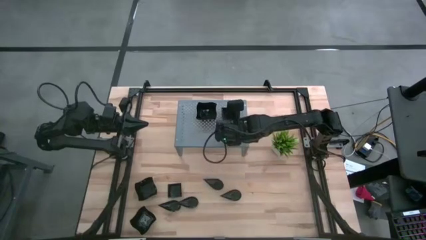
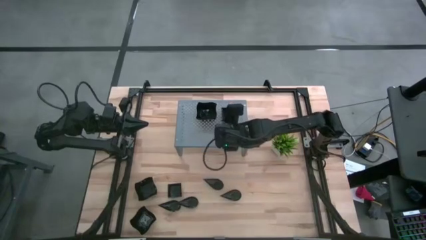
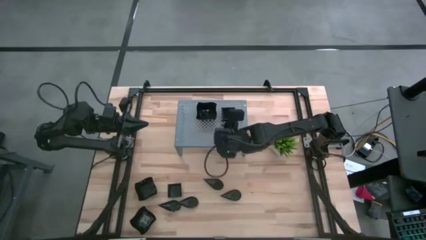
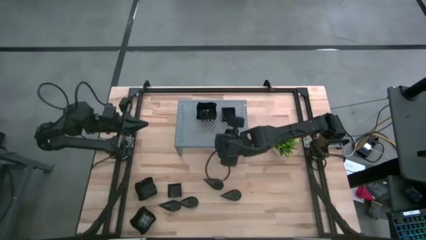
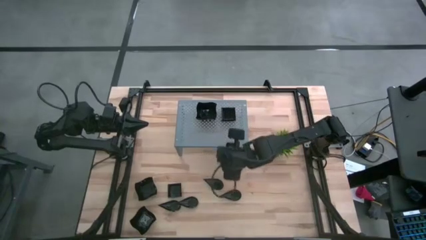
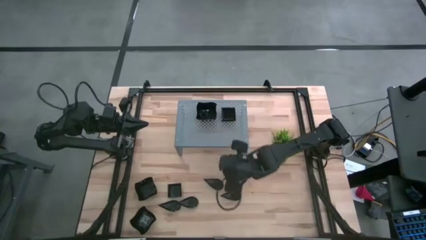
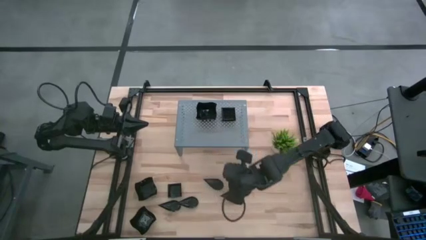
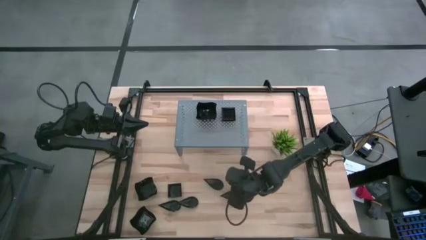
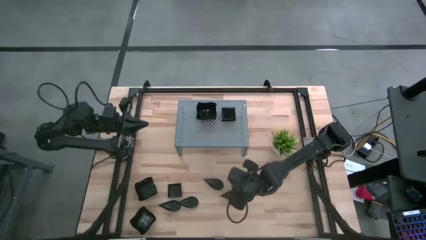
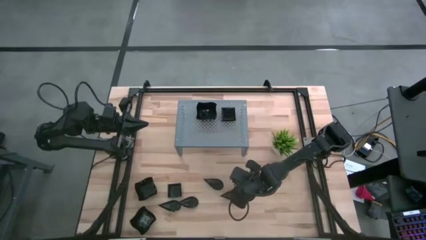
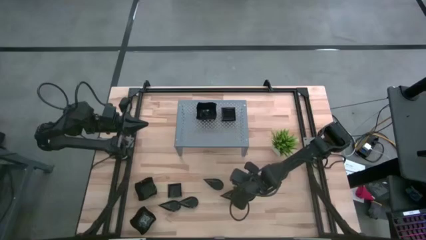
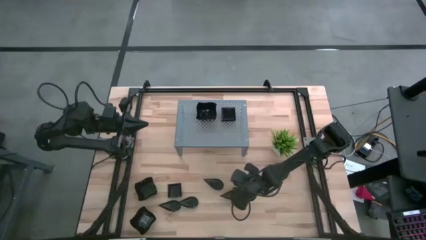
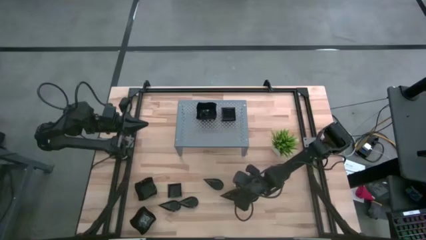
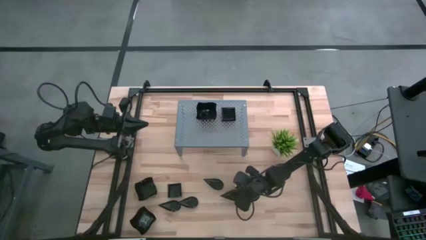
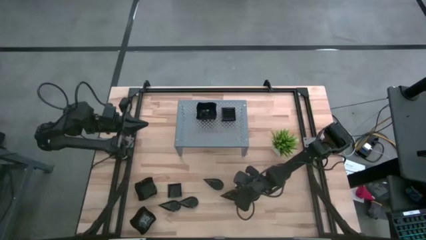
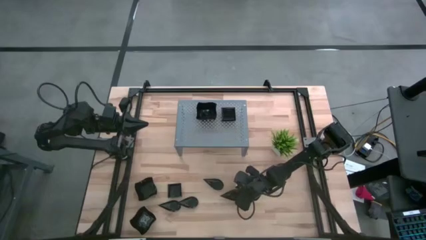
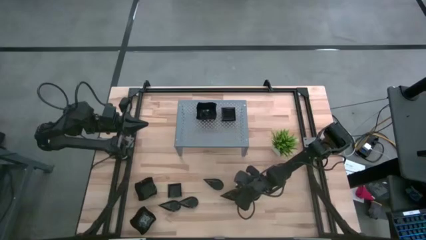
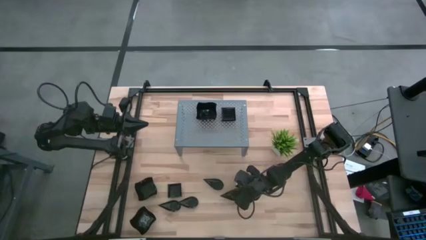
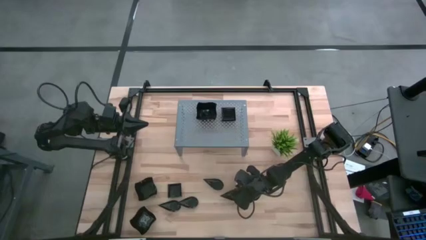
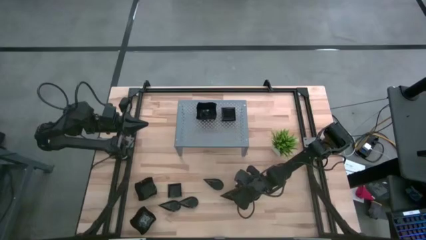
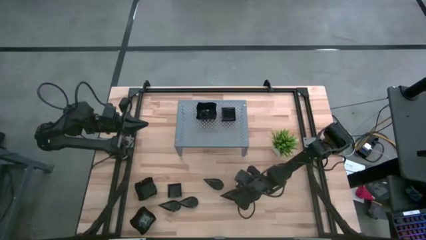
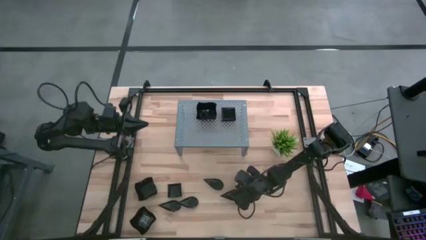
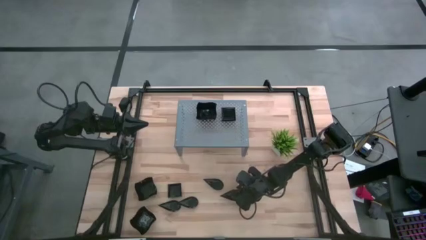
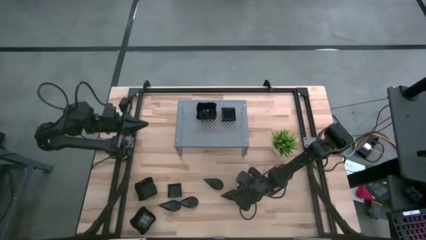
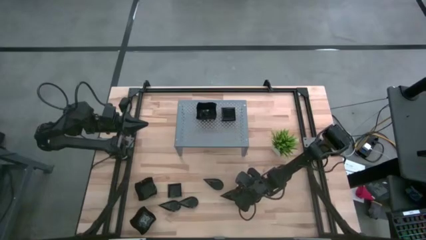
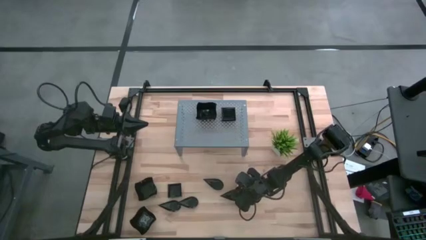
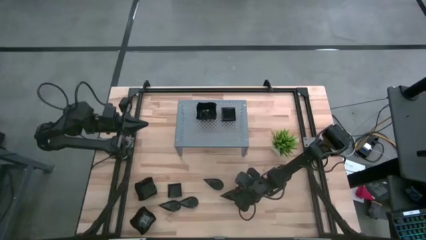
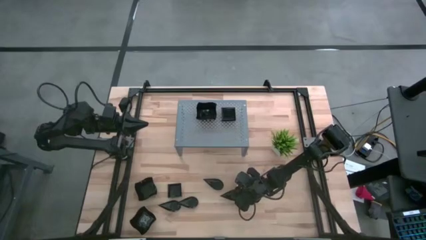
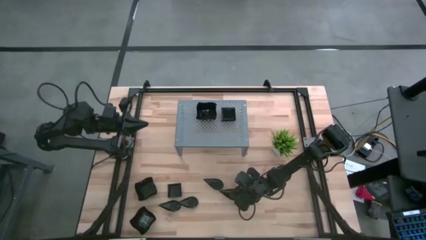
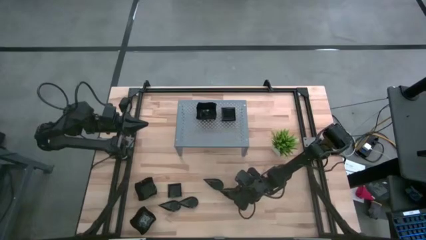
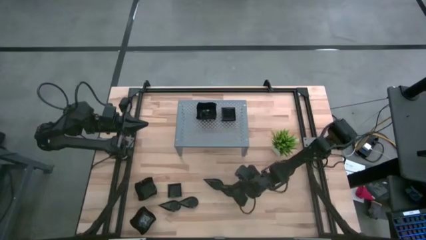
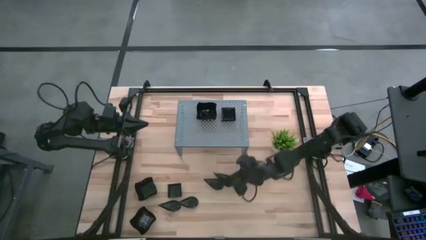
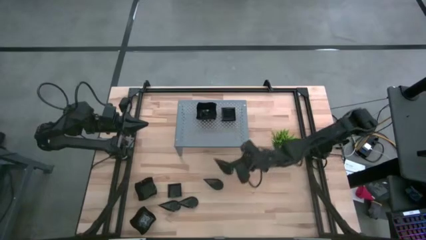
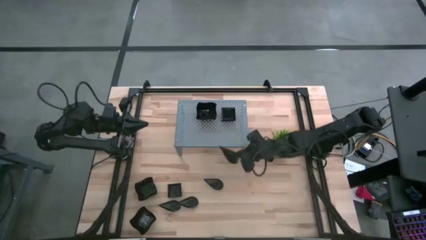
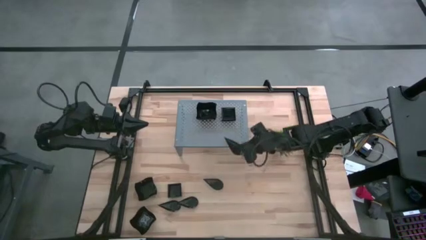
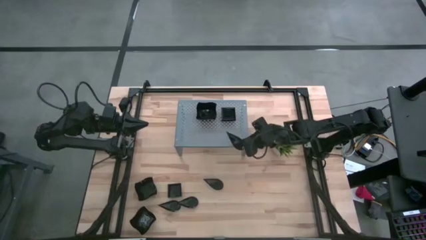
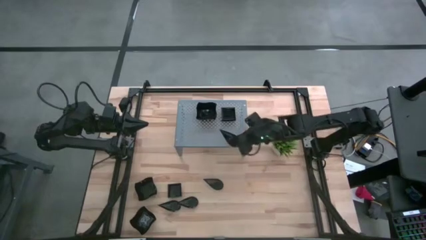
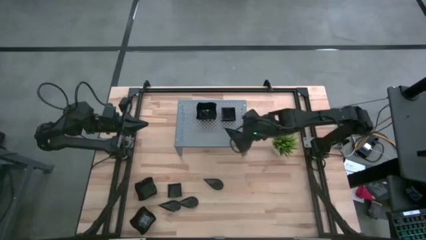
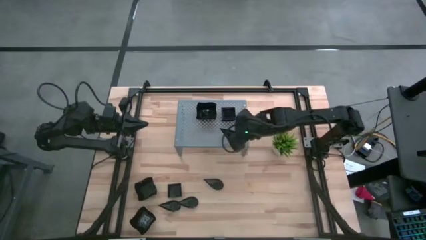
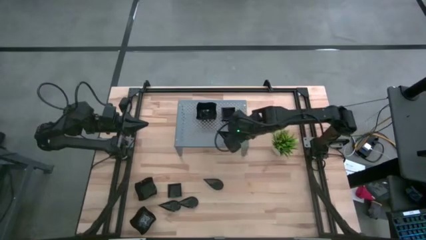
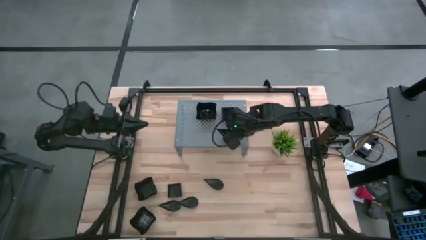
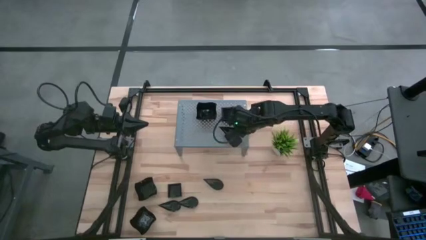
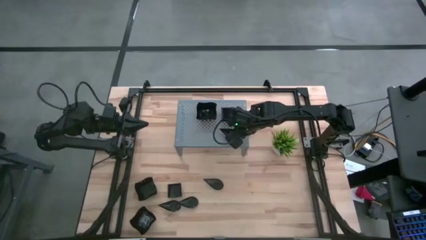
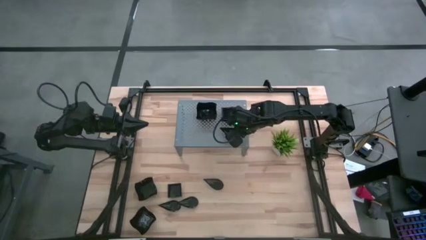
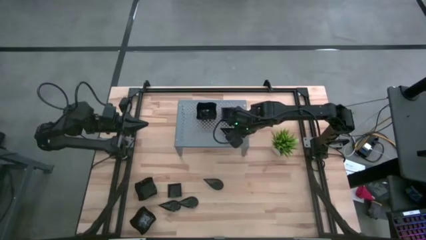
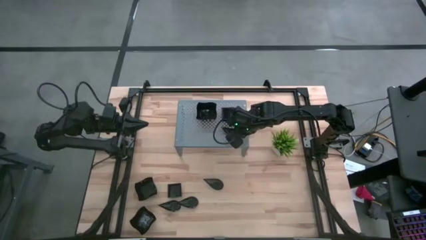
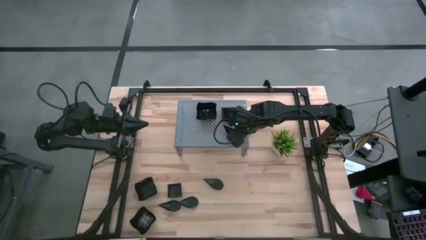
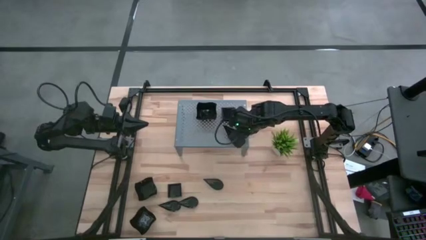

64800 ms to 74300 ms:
Task: Pick & Place Mini shaped plates
Put the drop-shaped plate on the shelf

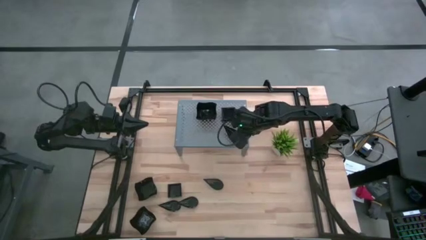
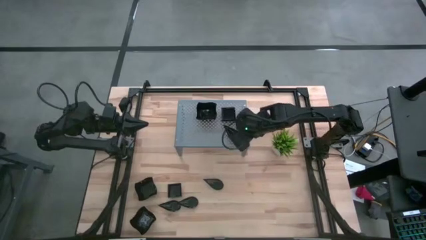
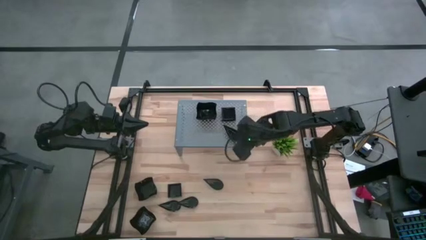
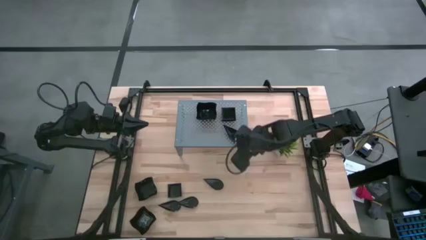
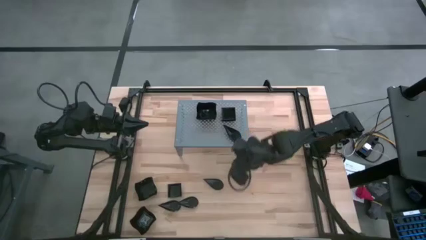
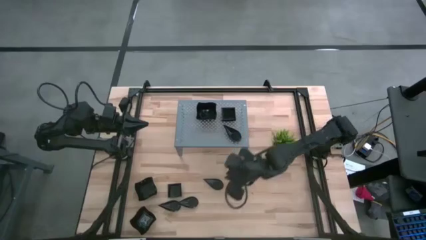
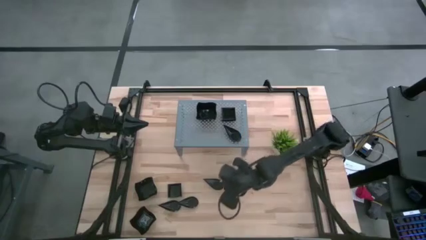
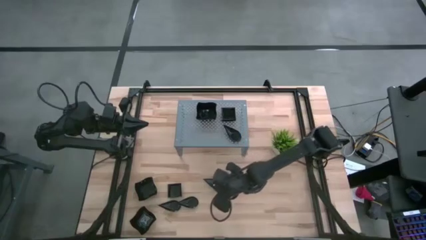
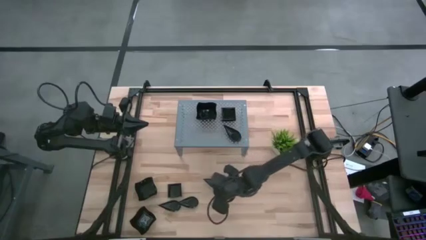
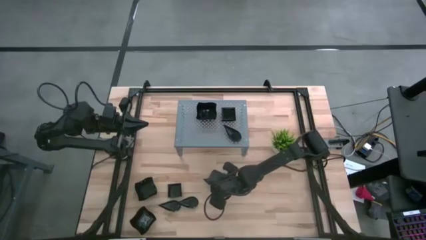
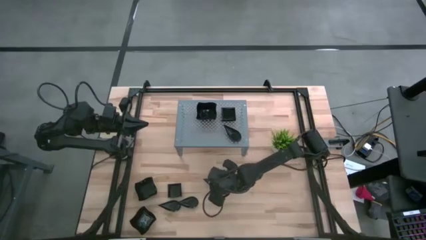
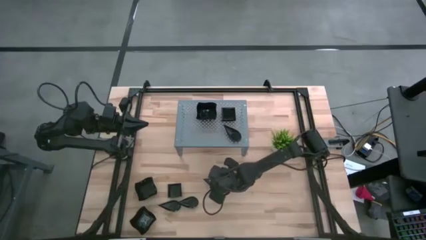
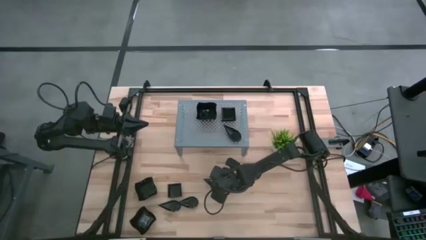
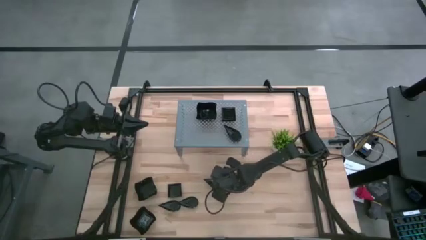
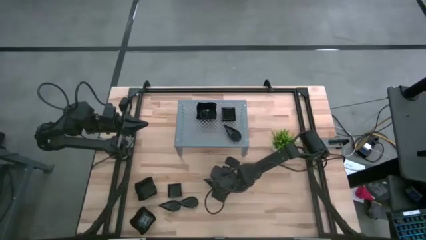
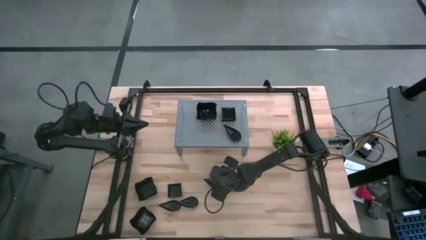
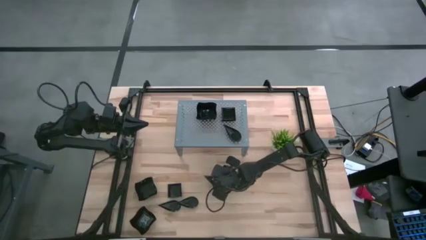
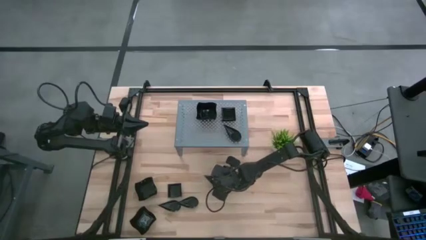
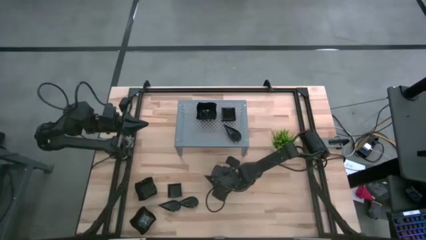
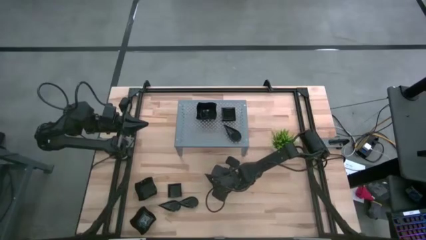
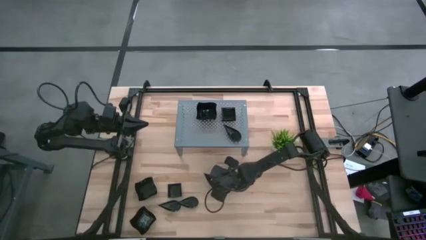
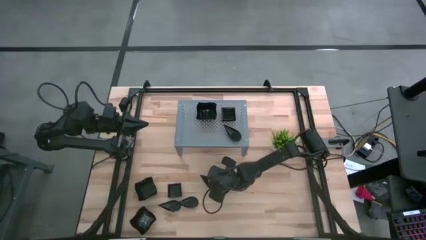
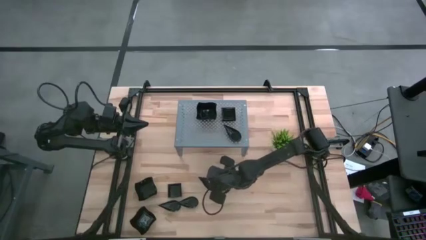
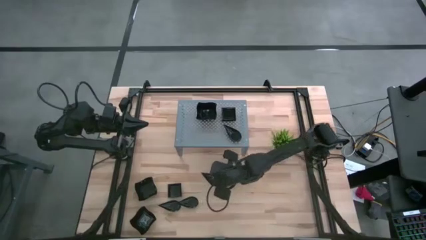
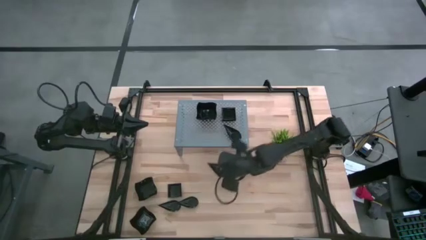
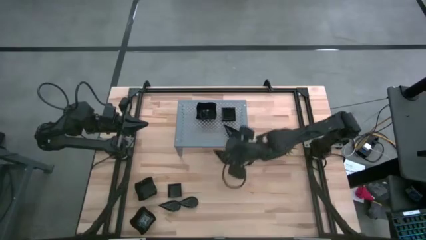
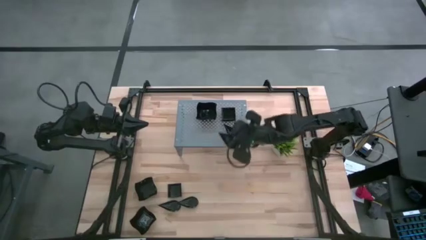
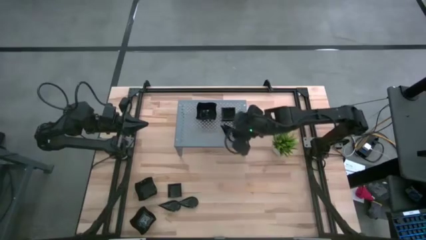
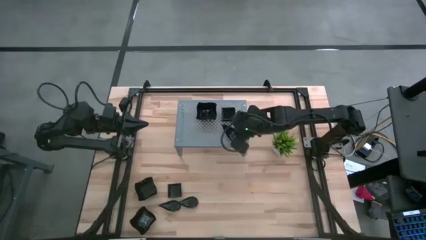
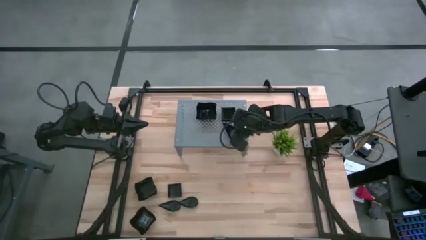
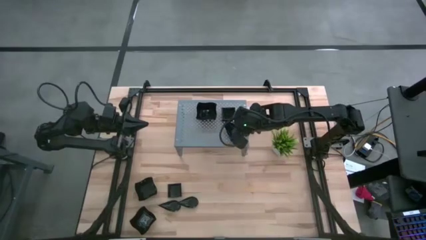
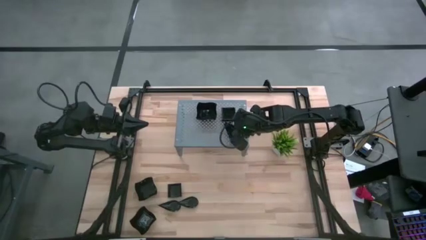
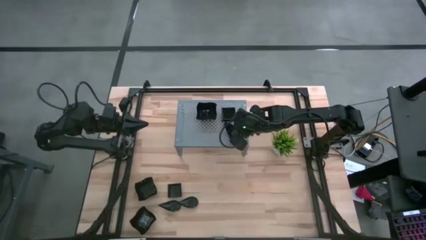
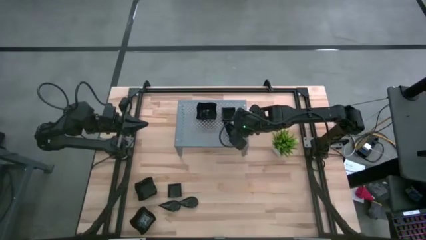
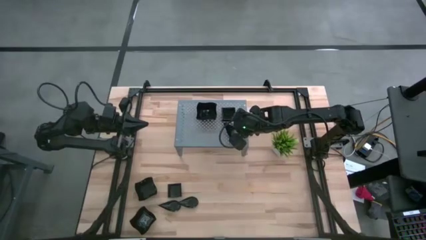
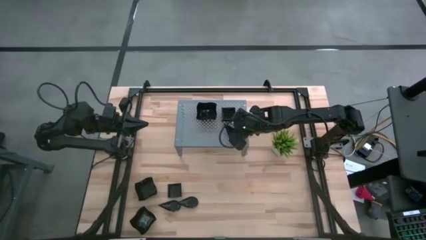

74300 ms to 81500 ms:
Stack the drop-shaped plate on top of the drop-shaped plate on the shelf

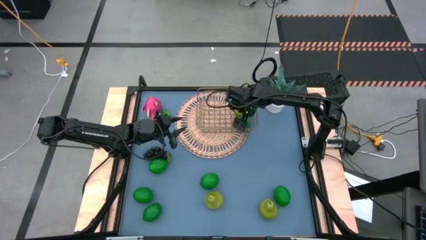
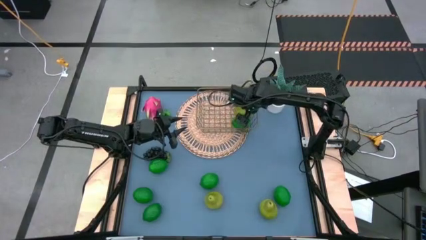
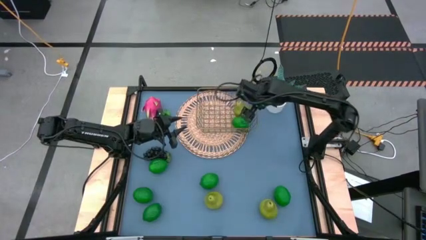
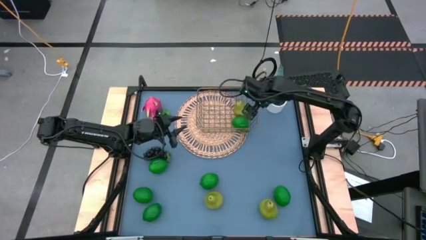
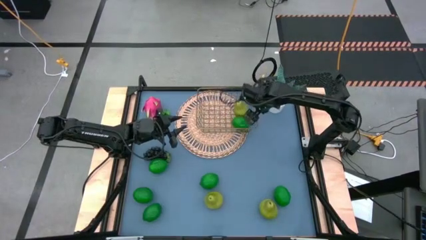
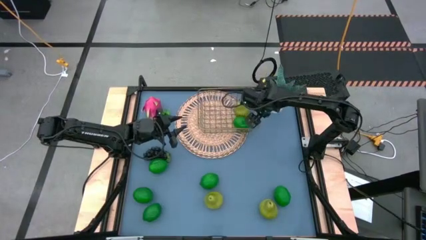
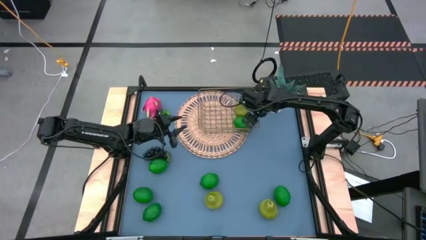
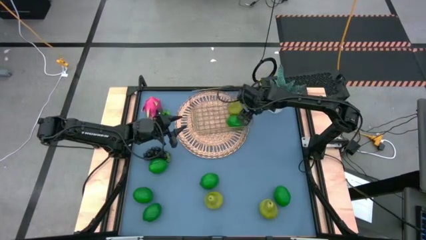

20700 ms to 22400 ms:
Task: Build produce basket
Adjust the wire basket
